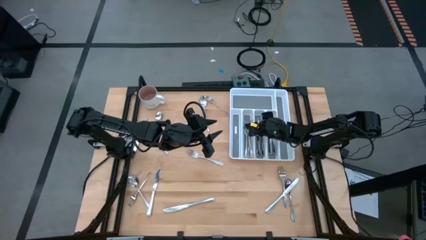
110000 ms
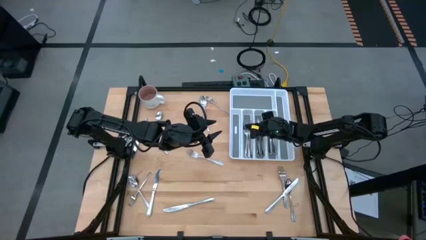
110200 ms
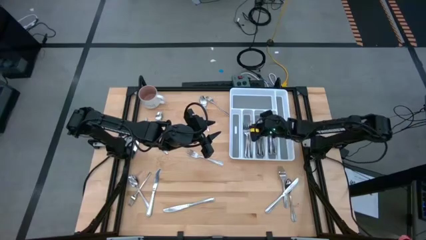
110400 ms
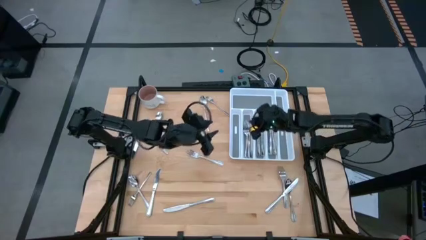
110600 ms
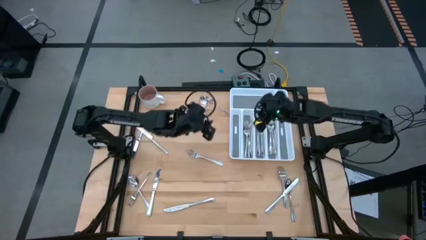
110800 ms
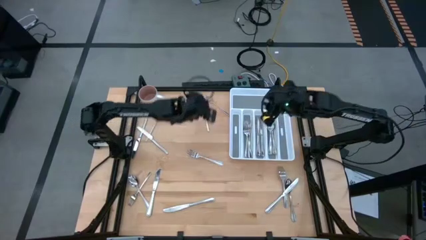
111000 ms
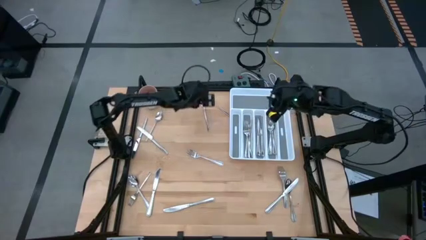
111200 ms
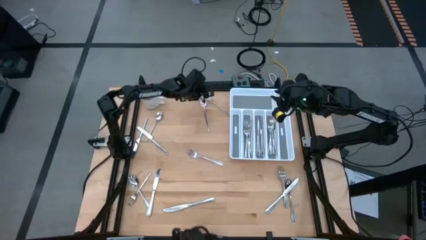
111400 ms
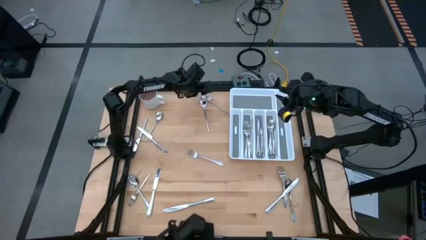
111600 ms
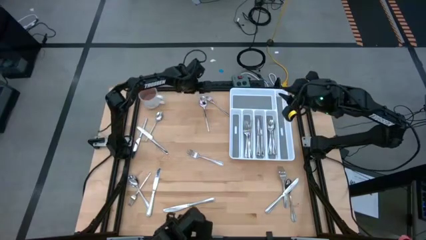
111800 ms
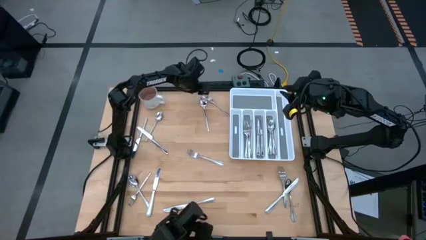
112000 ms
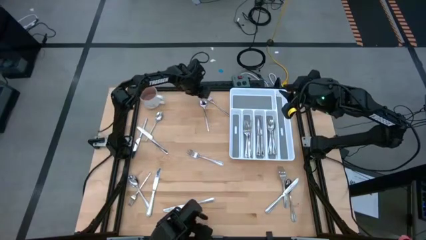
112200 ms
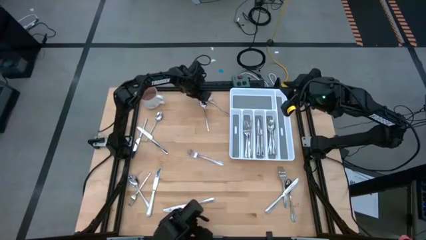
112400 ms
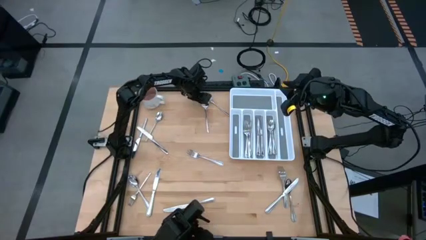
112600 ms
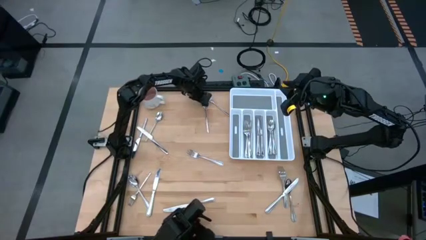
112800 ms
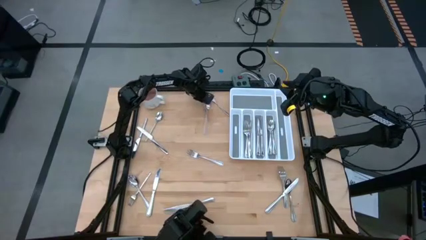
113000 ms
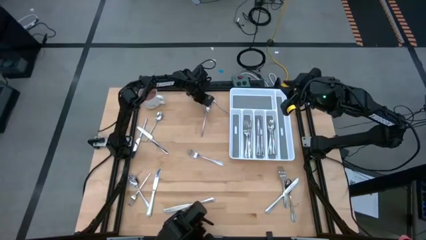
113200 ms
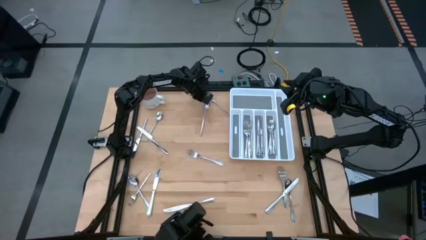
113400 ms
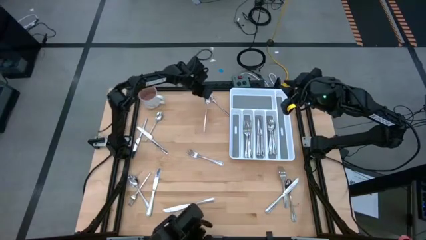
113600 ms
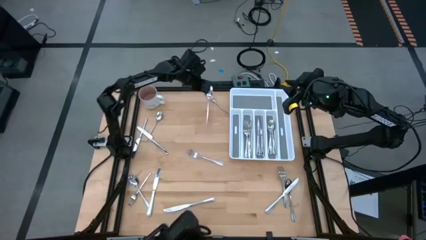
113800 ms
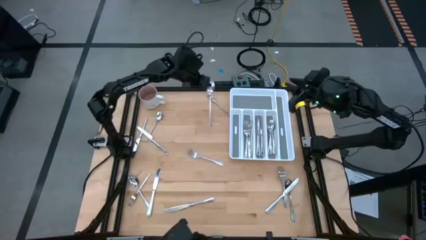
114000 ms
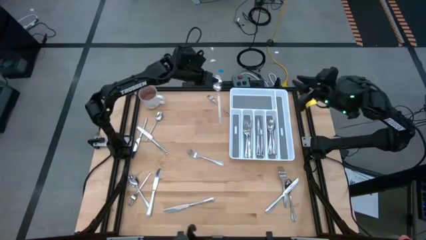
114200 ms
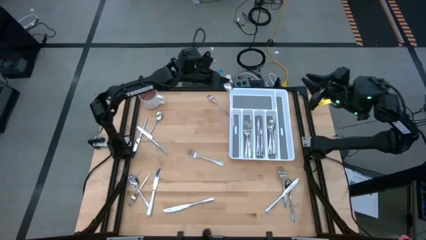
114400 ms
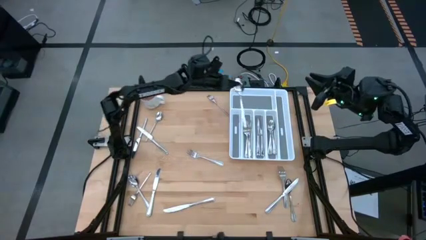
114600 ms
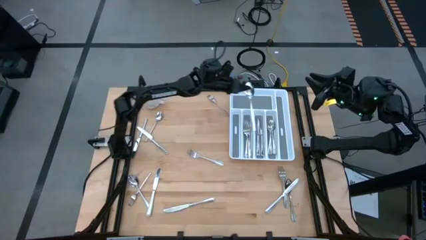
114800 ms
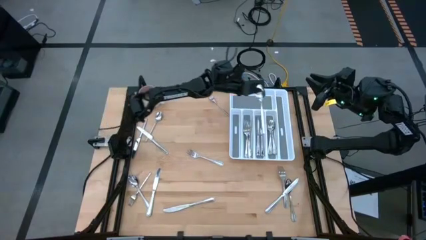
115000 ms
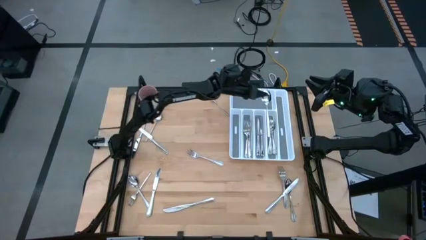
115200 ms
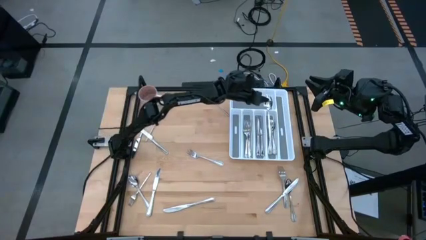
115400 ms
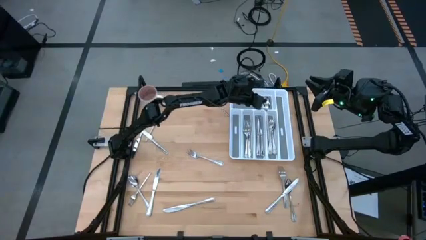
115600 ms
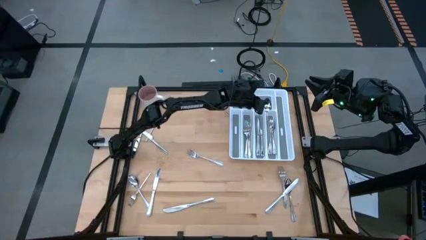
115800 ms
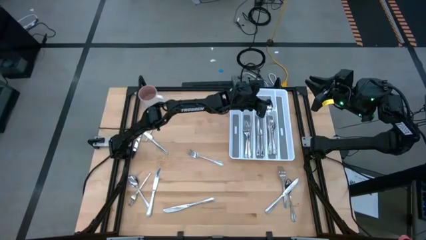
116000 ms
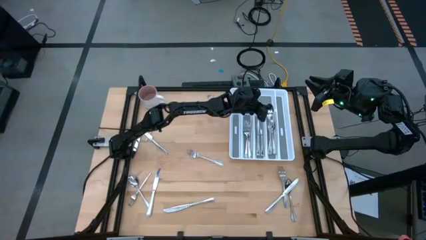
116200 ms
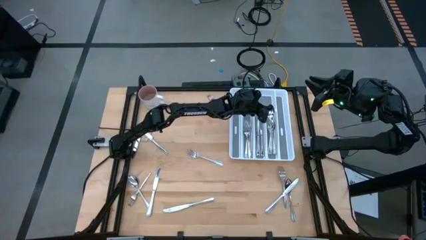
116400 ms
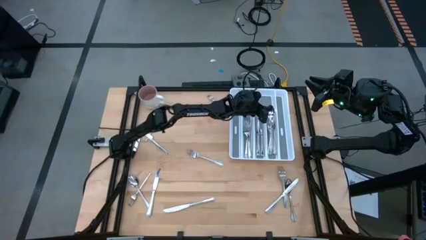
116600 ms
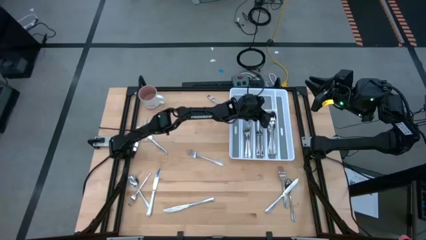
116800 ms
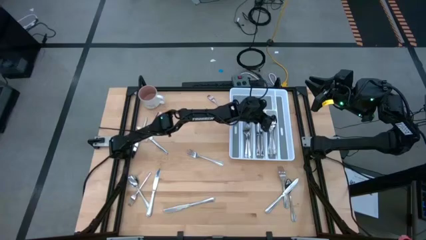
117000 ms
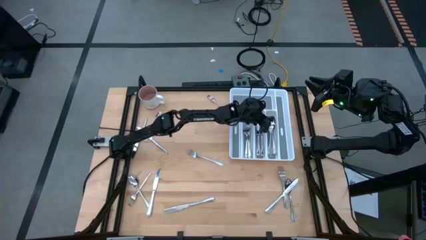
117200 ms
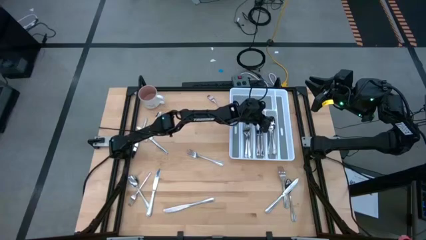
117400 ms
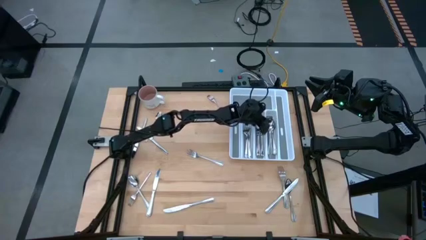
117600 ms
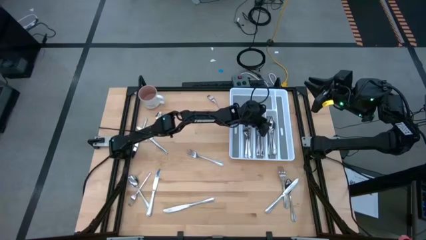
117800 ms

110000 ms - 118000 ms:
Task: Sort silverware
Put the silver spoon into the silverware tray

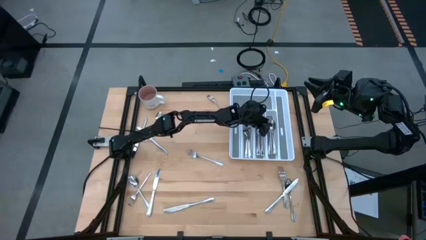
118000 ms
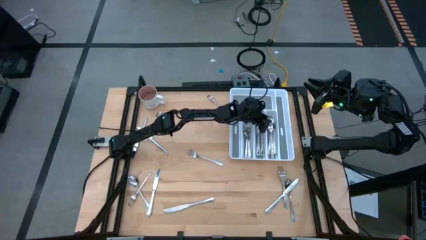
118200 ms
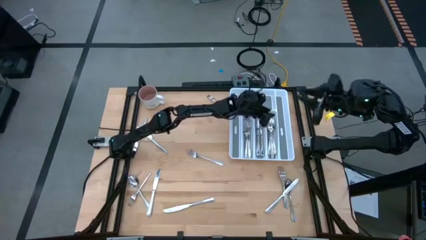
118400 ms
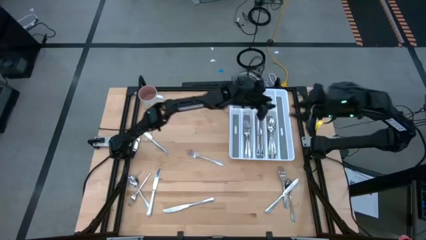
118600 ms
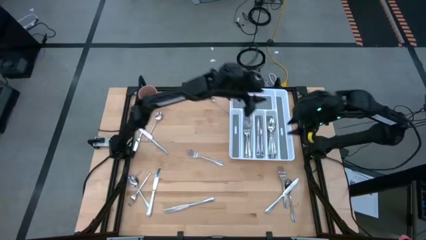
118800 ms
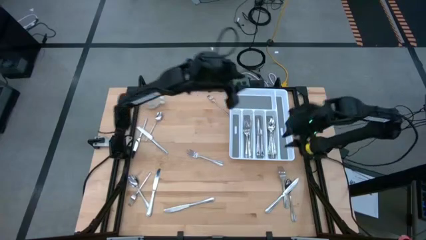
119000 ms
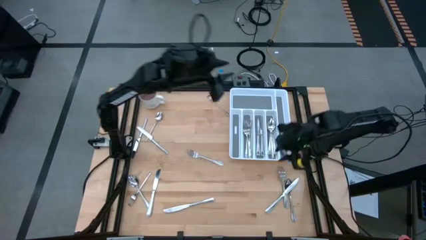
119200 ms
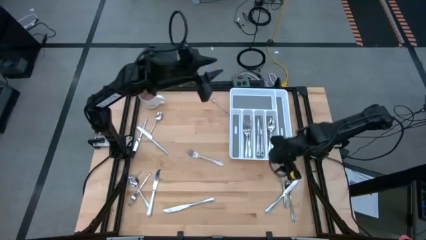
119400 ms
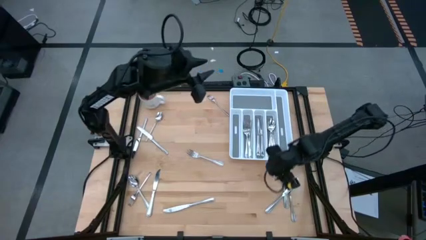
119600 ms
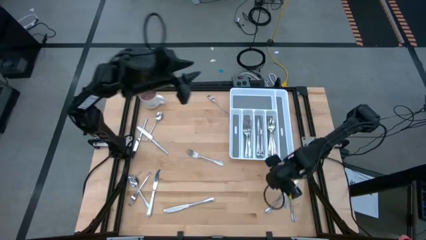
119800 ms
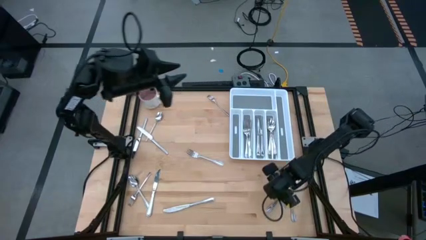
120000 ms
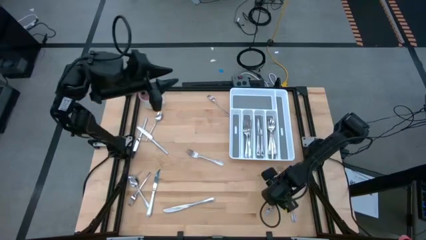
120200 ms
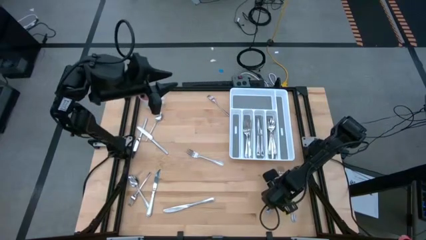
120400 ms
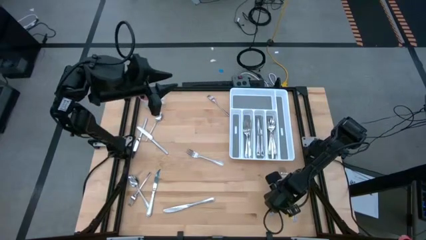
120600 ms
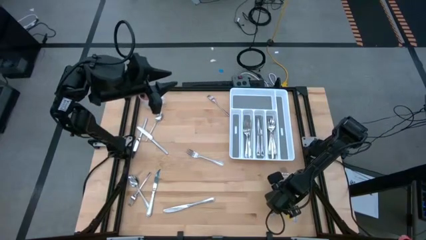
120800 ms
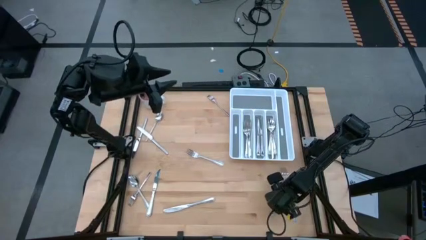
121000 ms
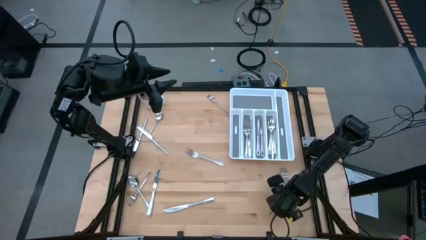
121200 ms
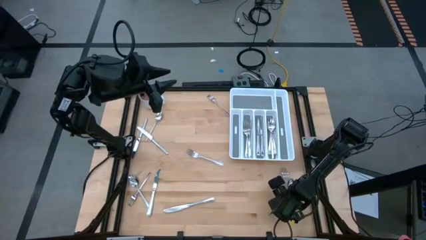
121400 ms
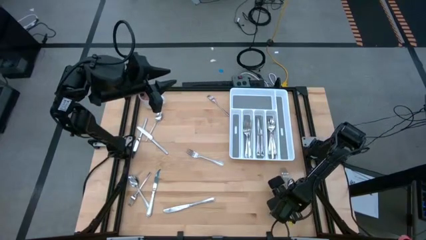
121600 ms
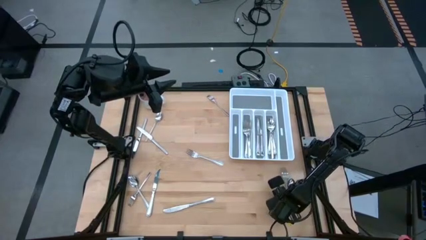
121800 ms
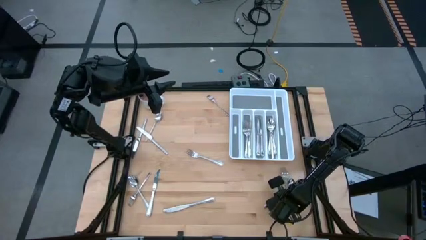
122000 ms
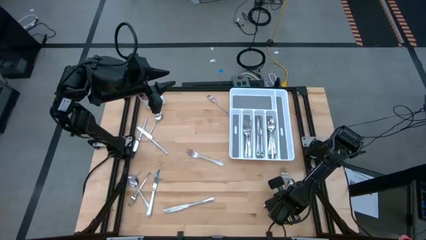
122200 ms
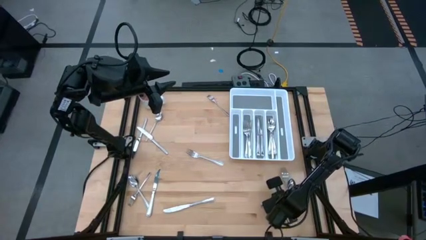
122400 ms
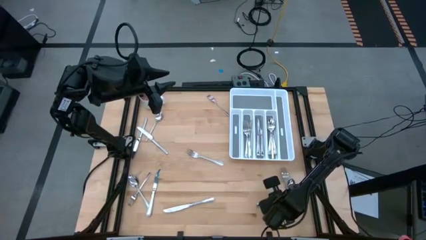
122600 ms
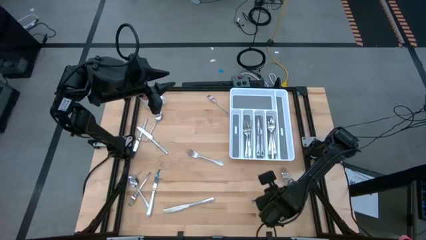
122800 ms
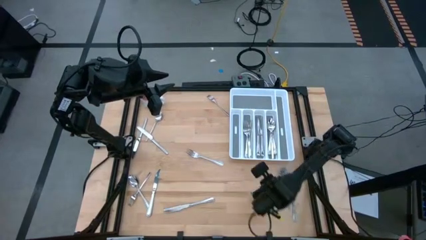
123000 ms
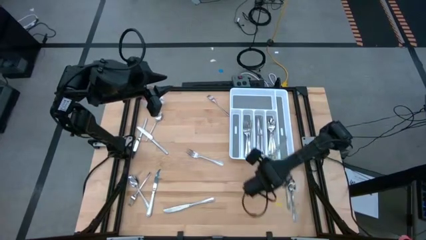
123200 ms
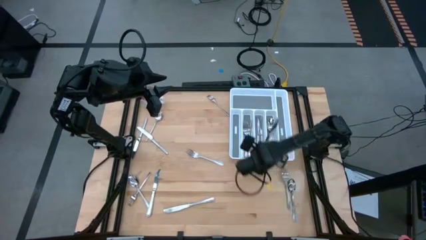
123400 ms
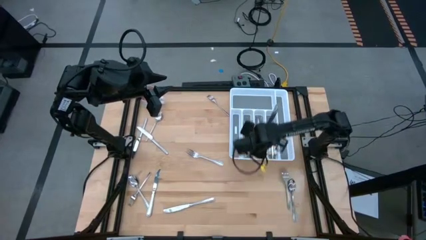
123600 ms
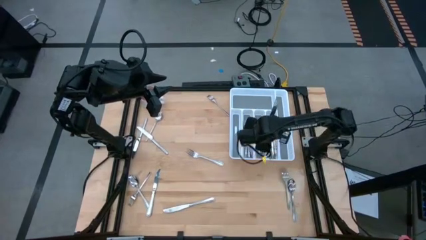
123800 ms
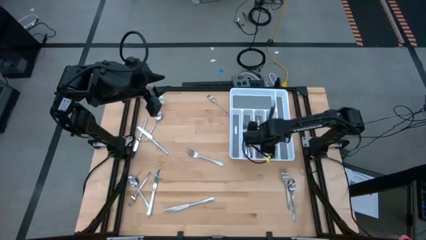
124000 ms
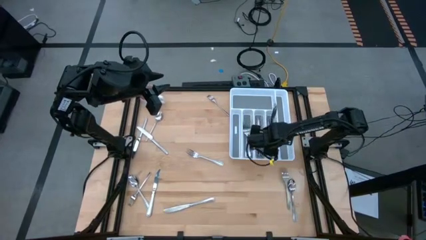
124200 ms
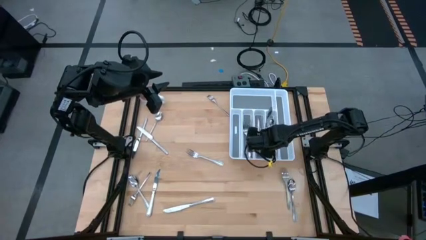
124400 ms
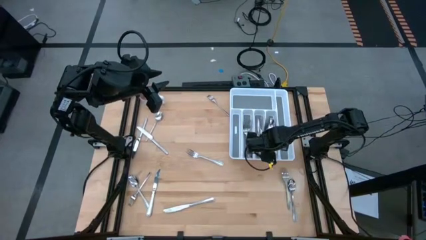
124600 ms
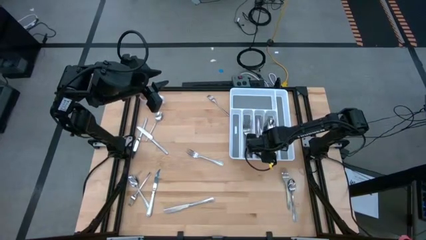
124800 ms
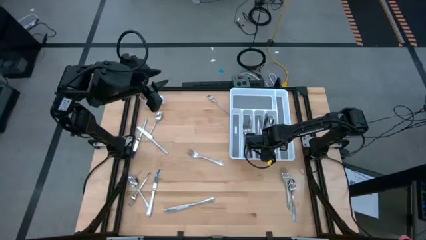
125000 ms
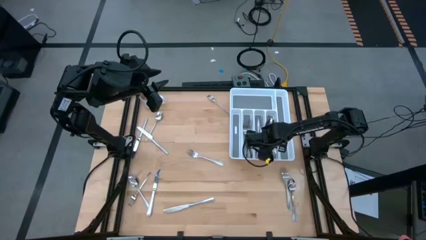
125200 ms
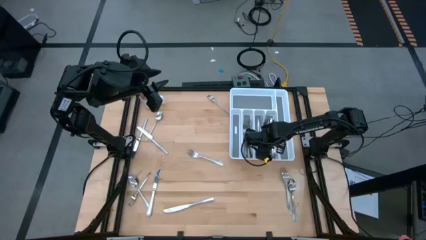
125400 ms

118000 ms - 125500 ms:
Put the silver table knife into the silverware tray

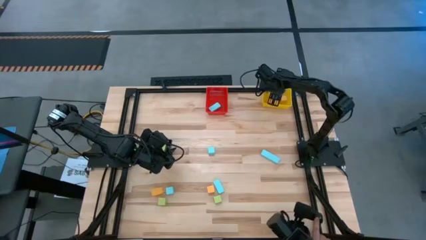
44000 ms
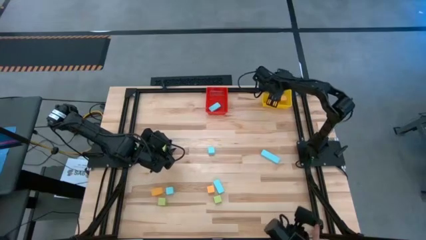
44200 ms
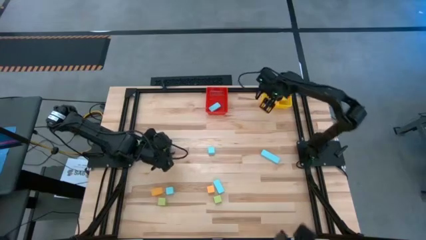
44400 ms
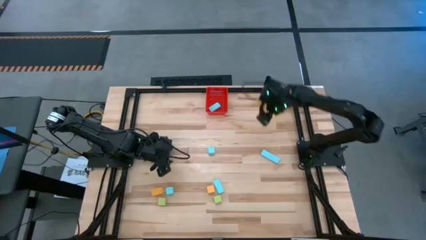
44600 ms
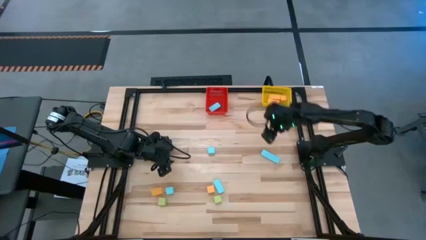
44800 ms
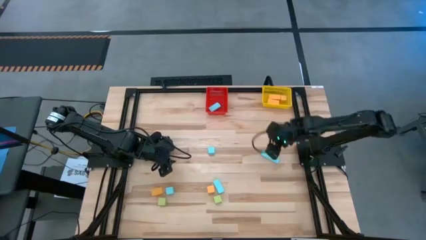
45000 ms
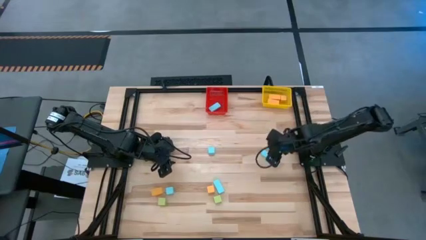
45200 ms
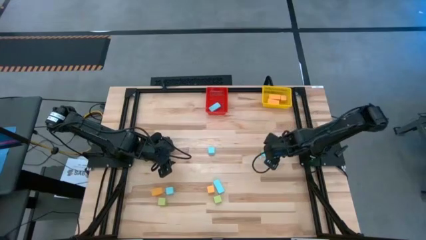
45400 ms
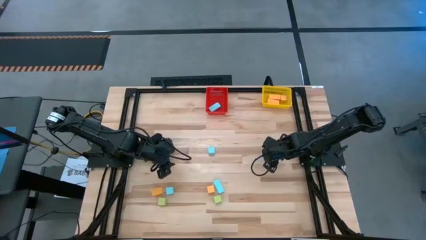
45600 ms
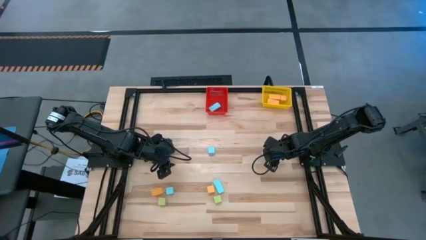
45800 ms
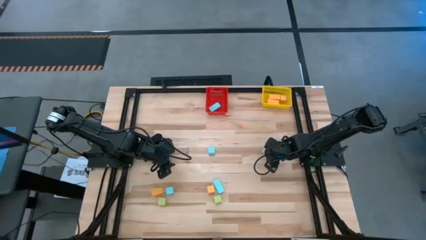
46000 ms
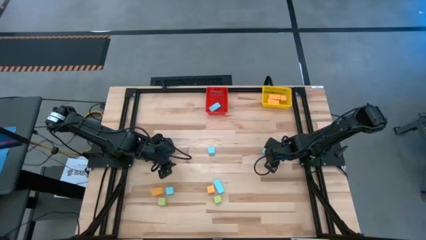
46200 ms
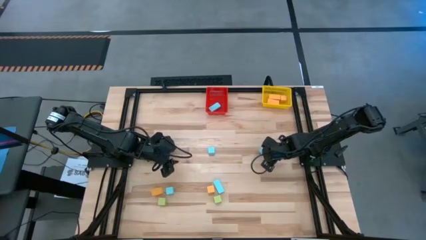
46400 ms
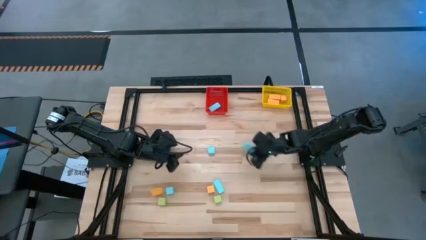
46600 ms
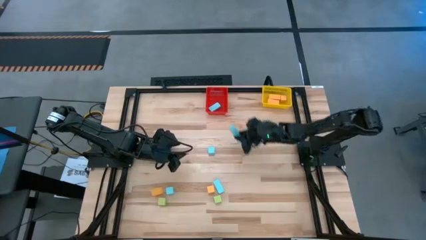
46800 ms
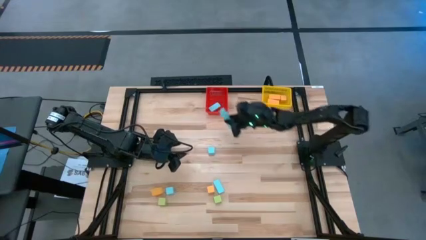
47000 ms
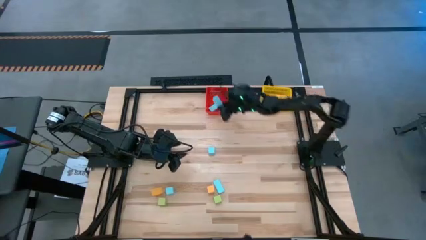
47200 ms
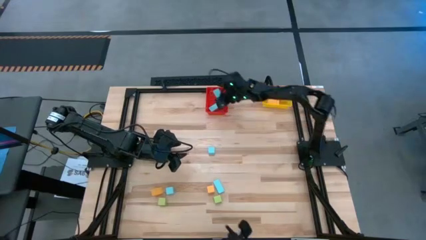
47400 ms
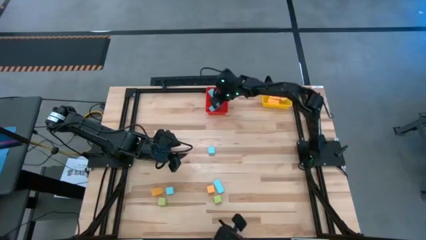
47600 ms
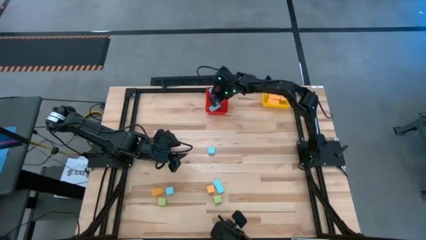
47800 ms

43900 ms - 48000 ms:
Task: Sort & place blocks by color
Put the blue block into the red bin
